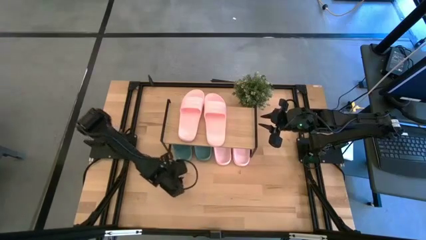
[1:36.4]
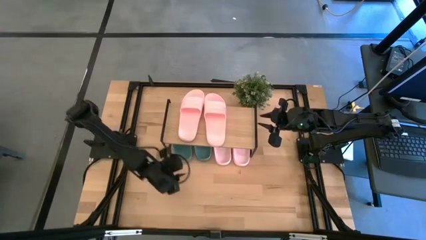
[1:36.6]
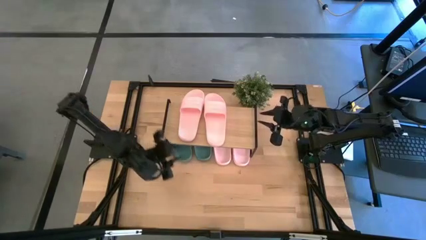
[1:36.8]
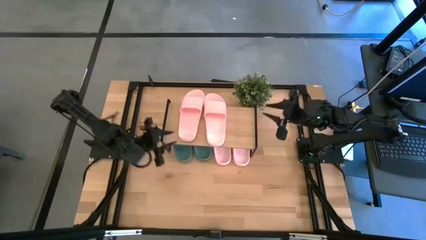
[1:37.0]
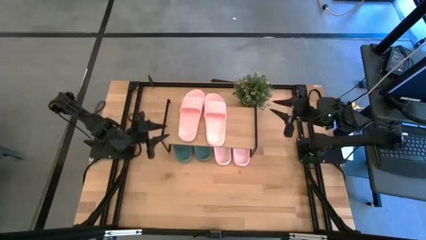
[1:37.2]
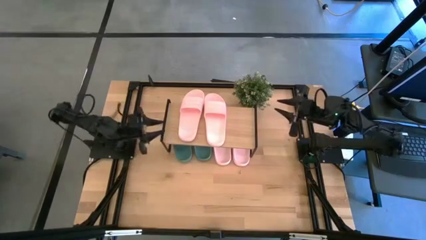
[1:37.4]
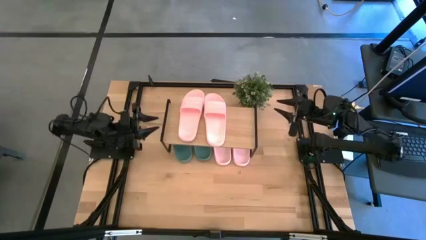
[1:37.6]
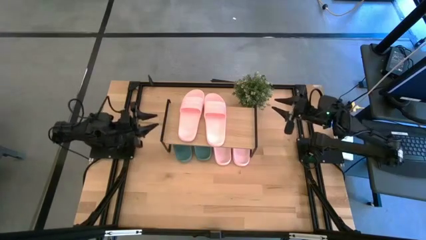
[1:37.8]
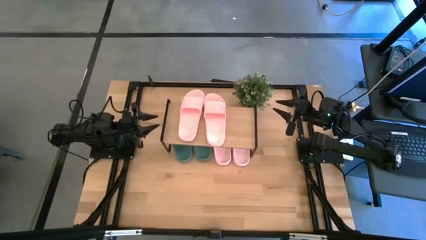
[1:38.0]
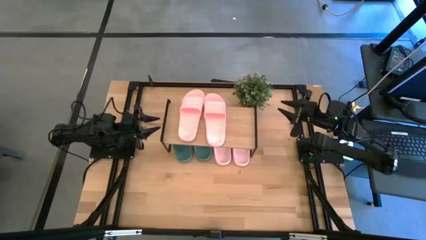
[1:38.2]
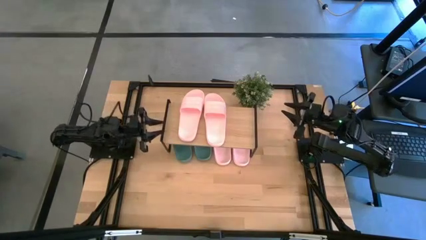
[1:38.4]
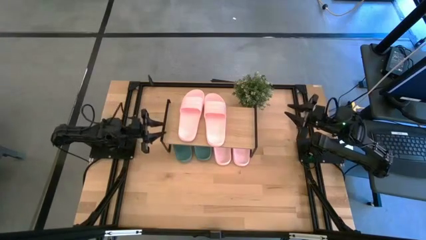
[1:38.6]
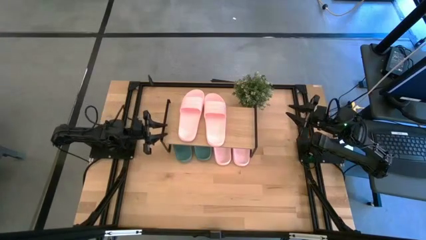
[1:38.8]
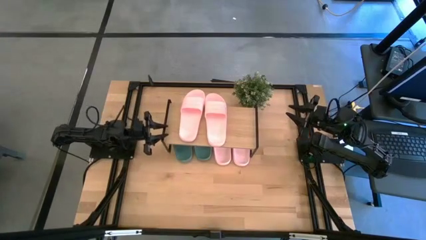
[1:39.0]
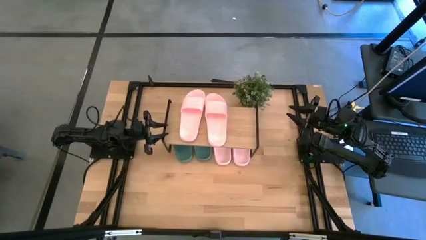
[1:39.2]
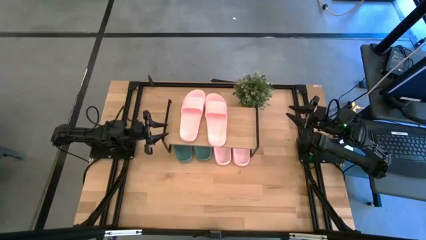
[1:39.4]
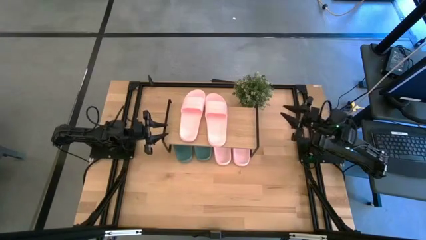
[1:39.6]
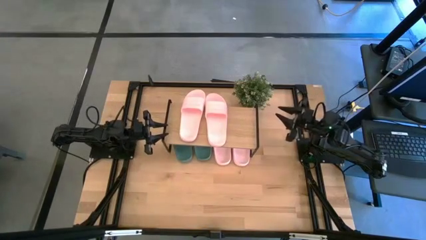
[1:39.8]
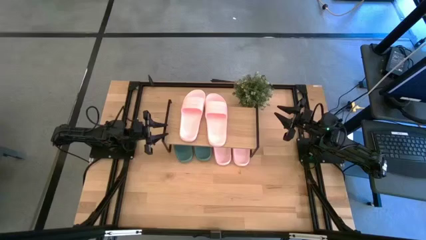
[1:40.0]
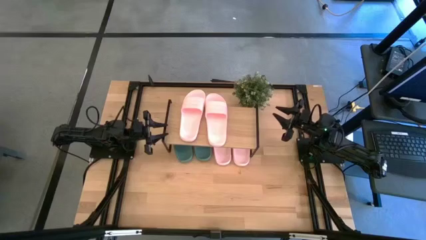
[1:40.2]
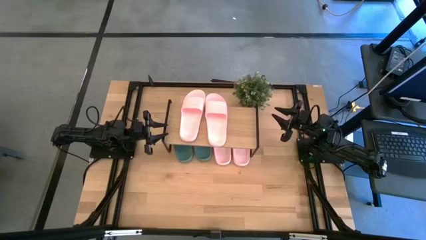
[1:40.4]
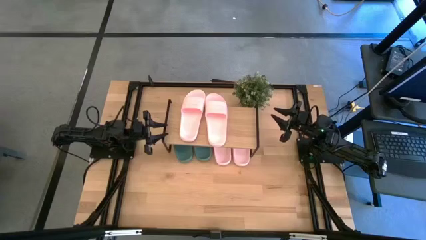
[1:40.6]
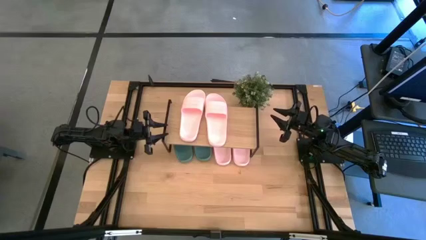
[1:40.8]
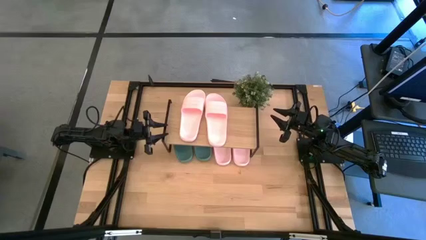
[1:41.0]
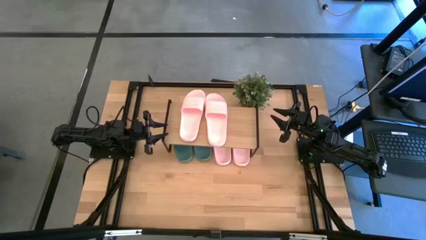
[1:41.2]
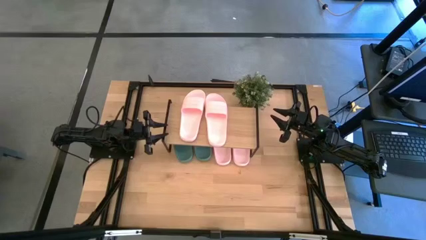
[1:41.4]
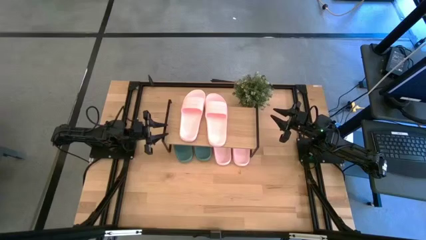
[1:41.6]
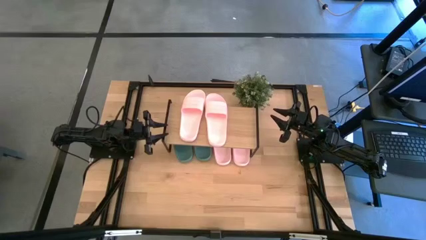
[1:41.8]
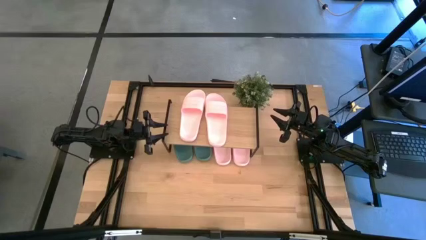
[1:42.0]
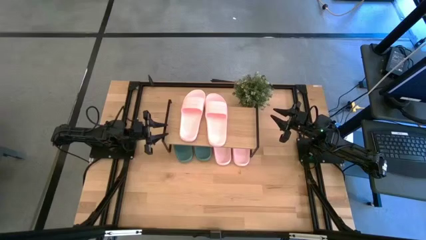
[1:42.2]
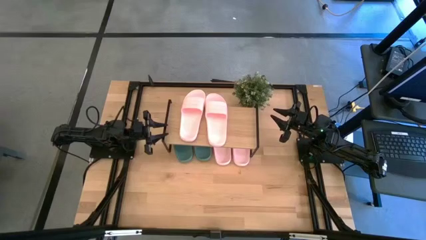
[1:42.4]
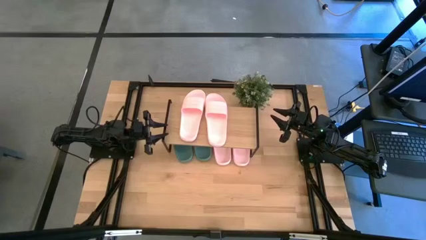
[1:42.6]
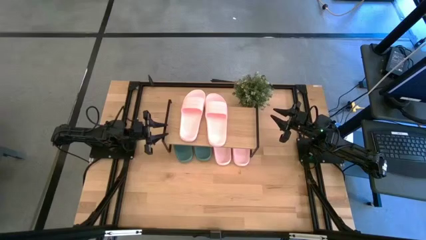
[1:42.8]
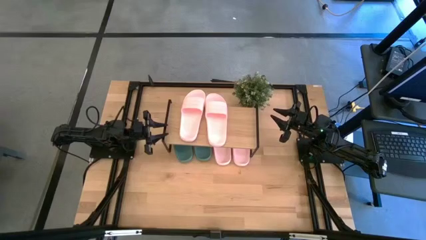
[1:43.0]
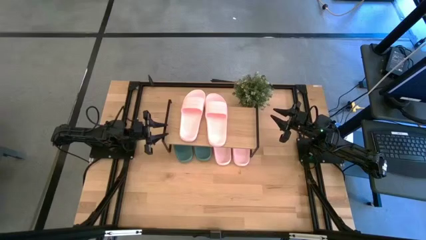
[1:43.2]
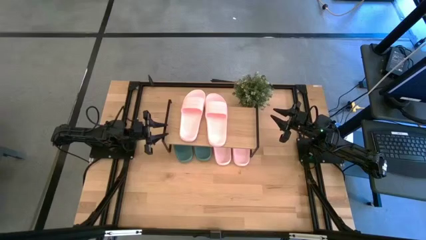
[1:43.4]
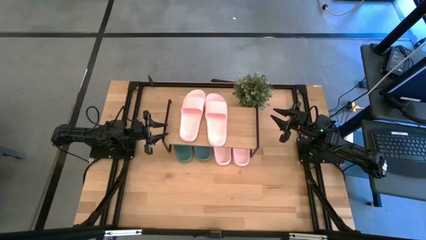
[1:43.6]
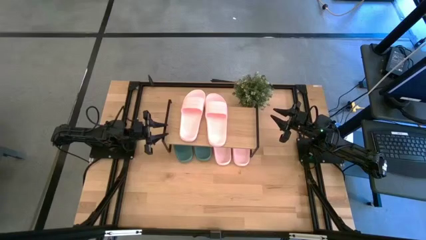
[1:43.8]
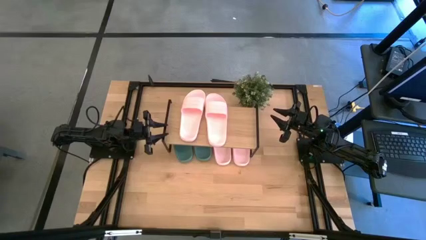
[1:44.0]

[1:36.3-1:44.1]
Task: Pick and place slides into the shelf
Return to Home Position

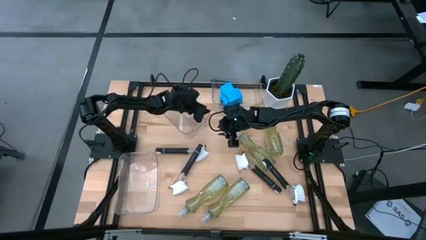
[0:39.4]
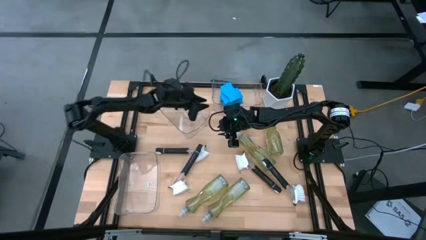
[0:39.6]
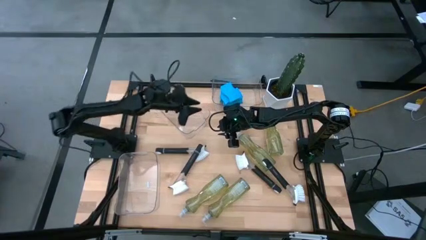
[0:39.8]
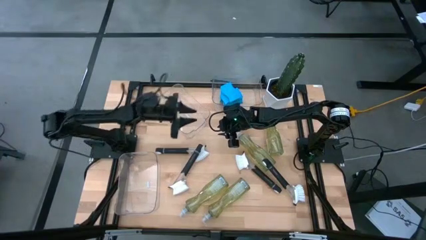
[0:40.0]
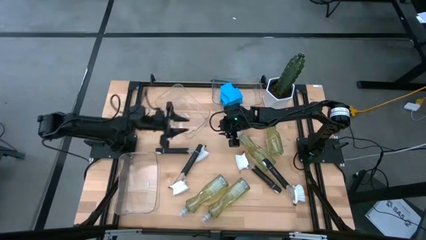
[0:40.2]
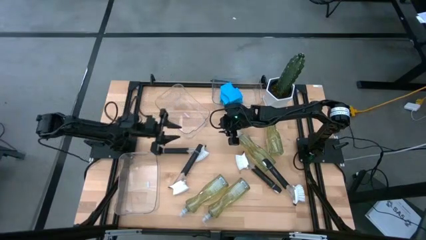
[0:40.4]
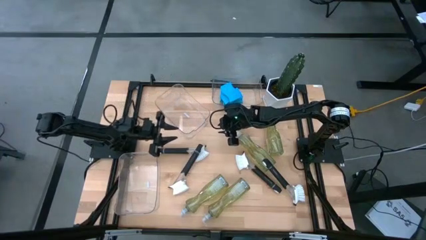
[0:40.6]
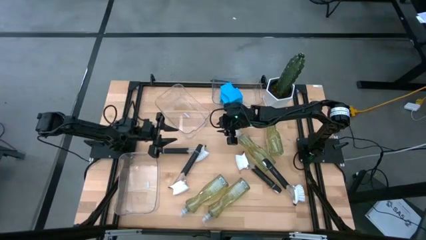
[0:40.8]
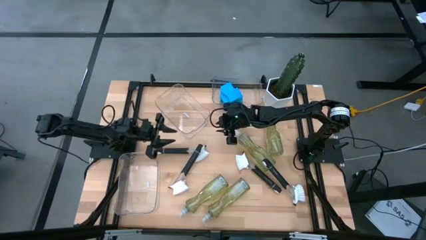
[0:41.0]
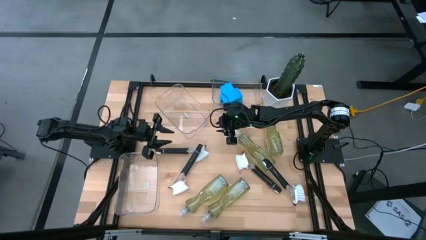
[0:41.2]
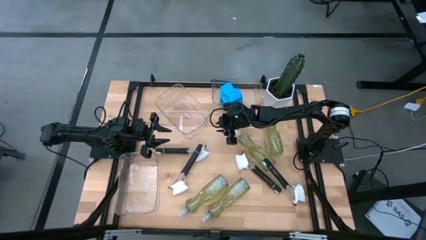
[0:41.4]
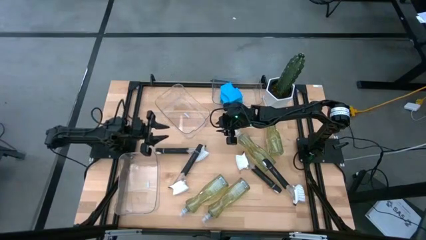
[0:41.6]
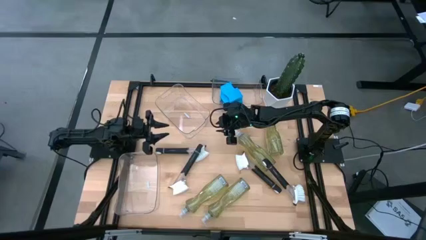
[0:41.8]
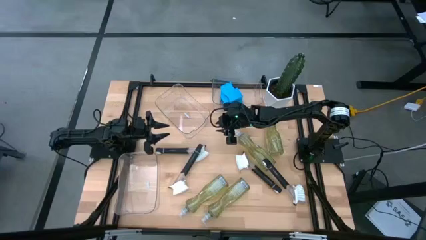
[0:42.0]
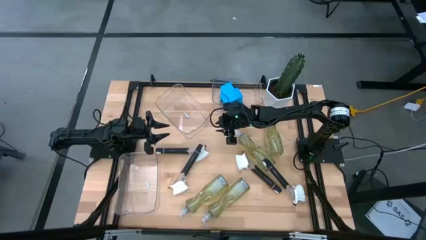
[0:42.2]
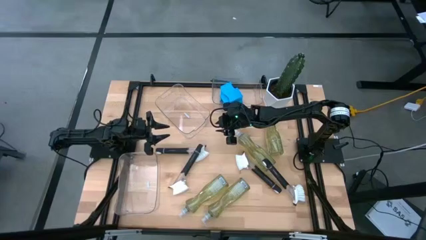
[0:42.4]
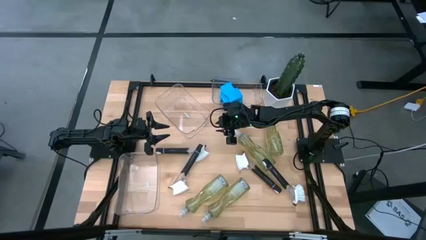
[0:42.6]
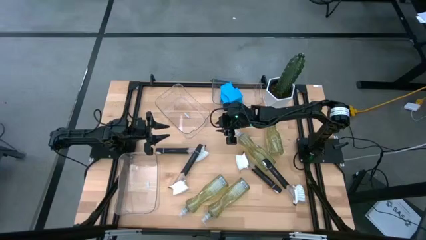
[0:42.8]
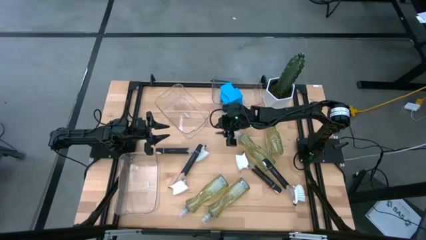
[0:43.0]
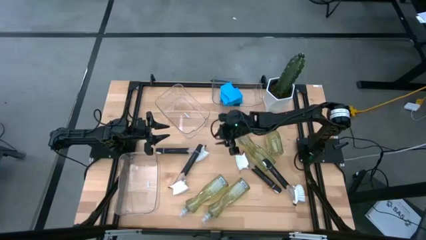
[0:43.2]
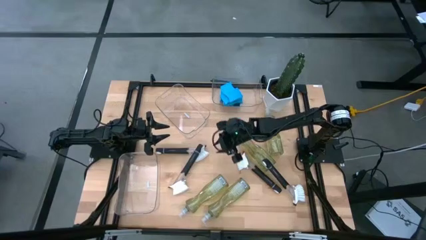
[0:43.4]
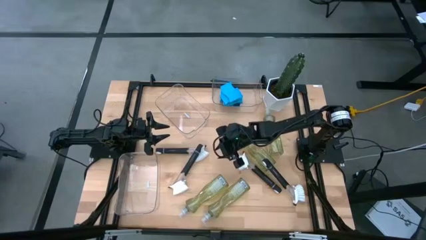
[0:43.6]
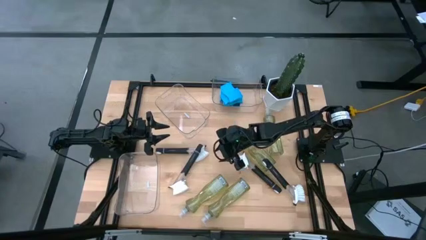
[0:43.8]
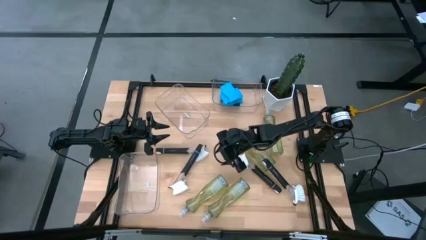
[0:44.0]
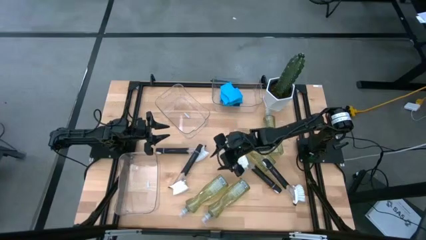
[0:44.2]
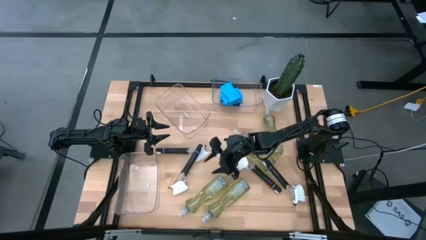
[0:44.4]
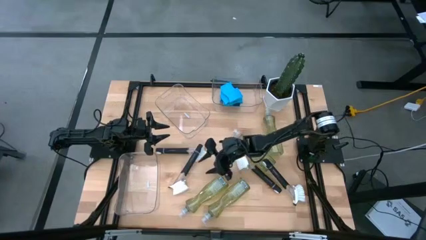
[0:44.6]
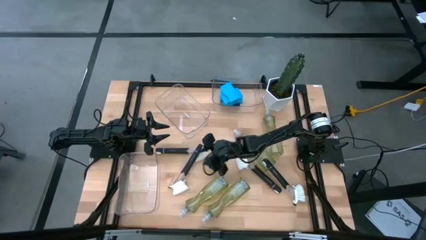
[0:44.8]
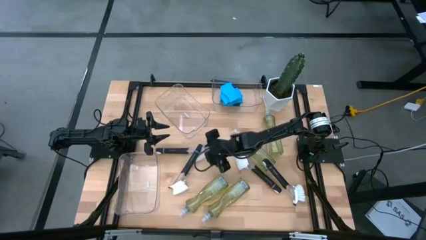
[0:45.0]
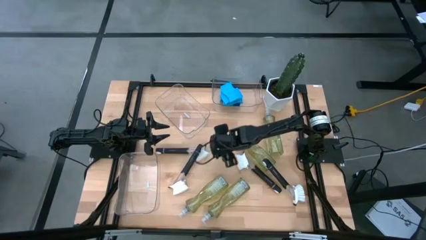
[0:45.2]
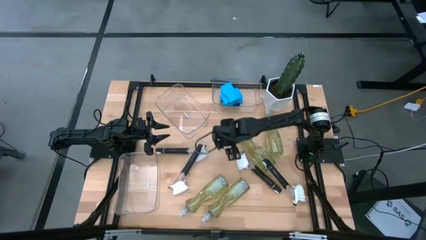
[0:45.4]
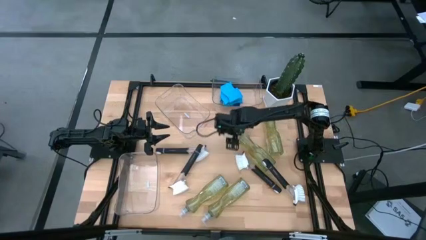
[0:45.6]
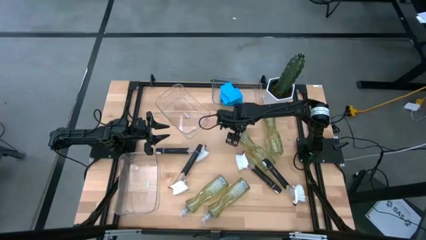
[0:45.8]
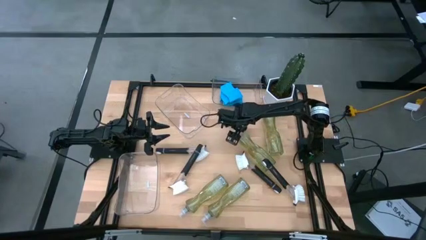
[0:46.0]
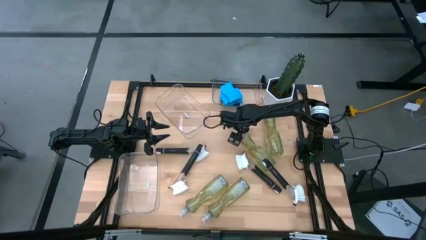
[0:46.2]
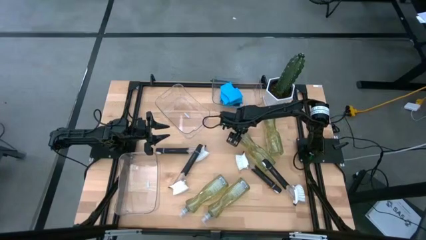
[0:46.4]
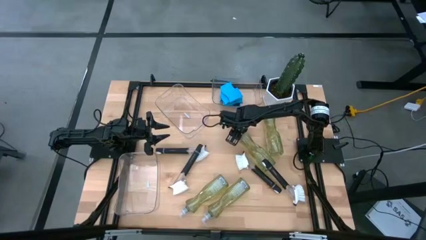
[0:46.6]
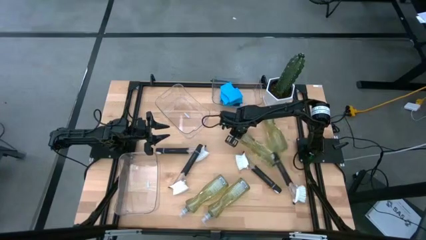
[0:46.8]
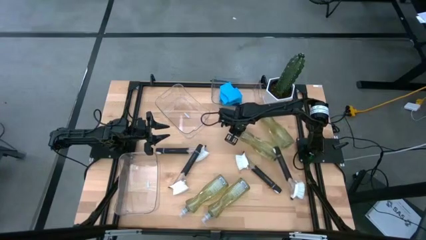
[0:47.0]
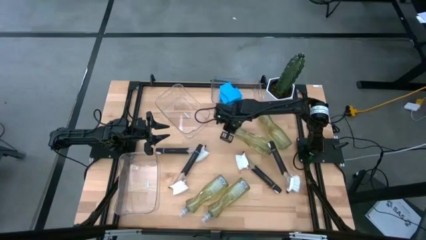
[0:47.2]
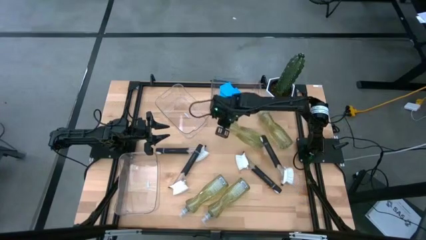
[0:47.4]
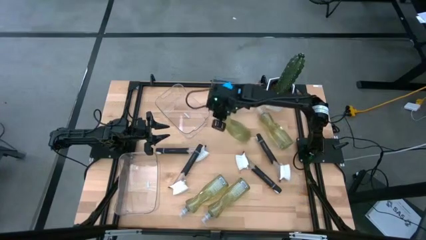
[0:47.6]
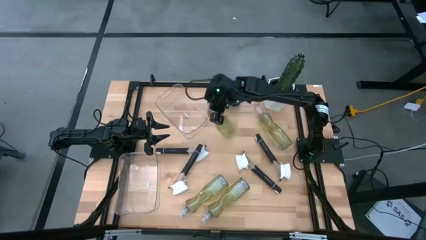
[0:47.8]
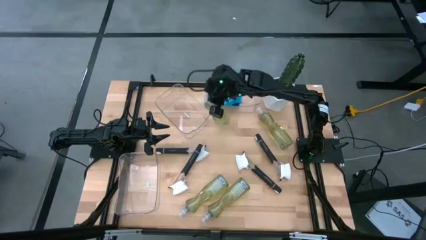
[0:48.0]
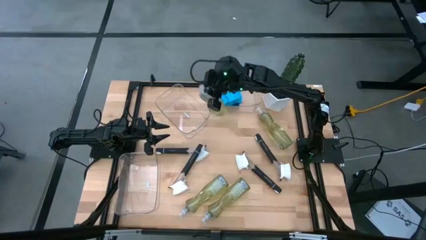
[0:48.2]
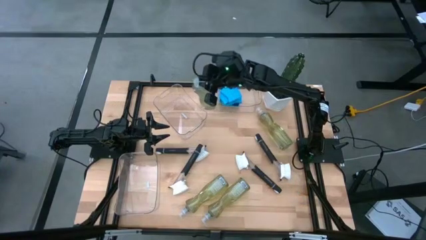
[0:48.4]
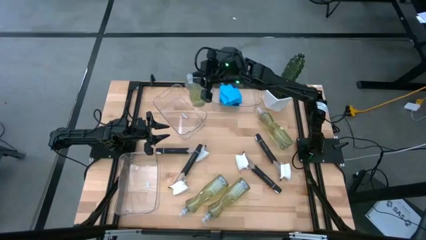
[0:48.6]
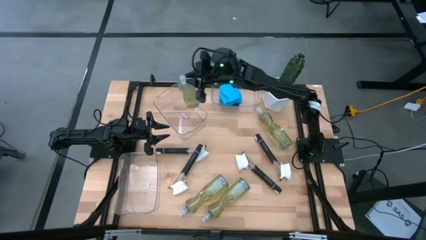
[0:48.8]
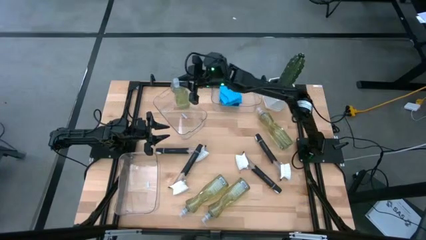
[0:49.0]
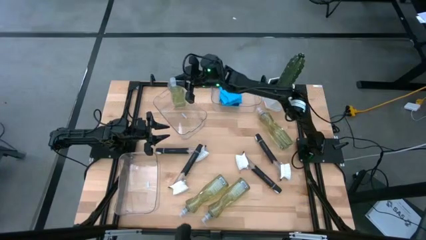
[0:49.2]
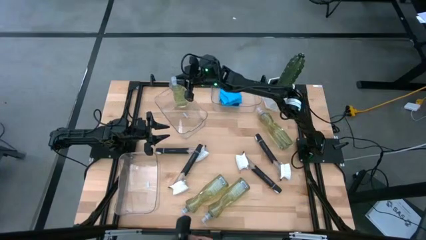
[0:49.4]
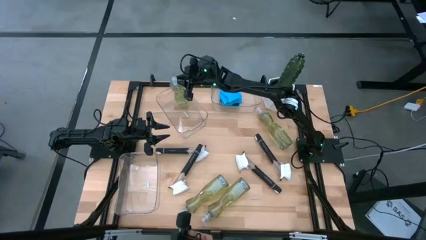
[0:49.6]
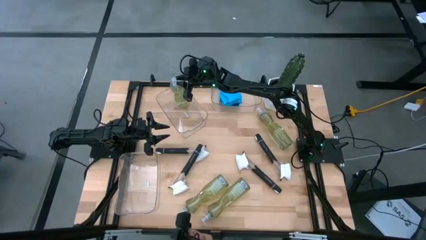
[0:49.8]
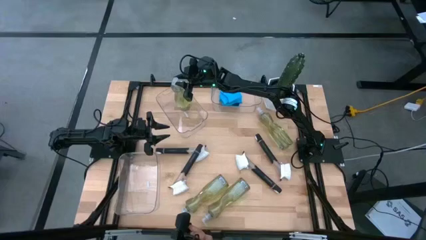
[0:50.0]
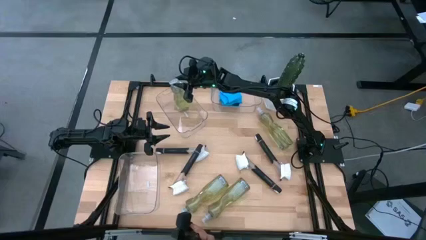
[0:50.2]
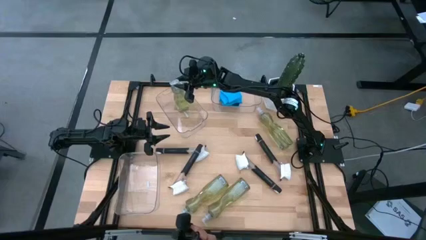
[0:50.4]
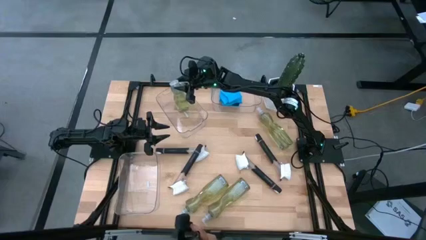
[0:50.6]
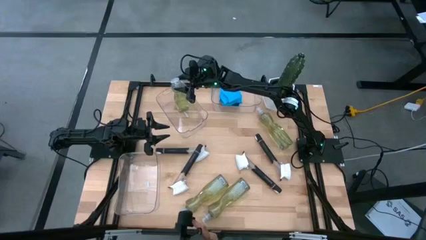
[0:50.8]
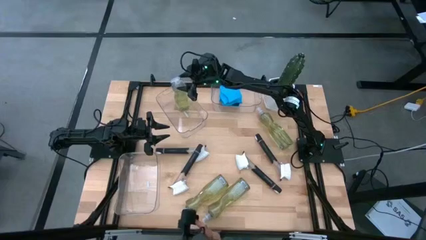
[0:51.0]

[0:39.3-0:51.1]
Task: Pick & Place Kitchen Sink Supplies
Put the yellow dishwashing liquid bottle into the top left transparent bin
